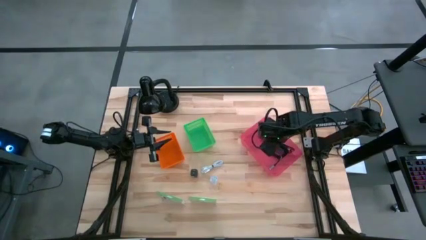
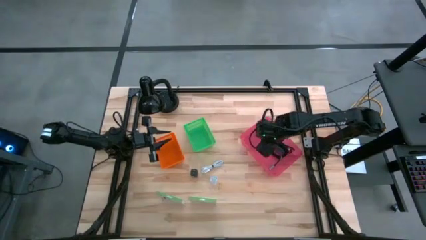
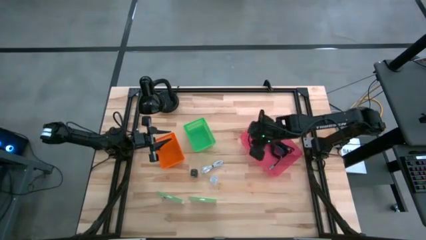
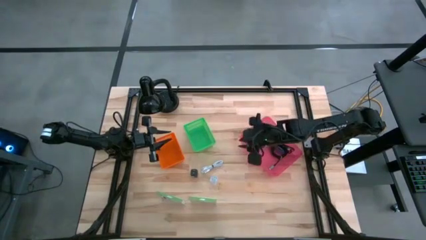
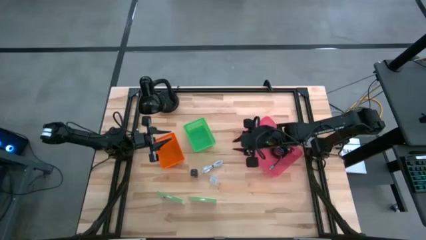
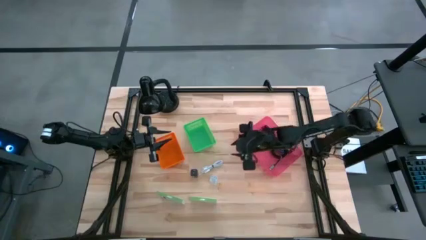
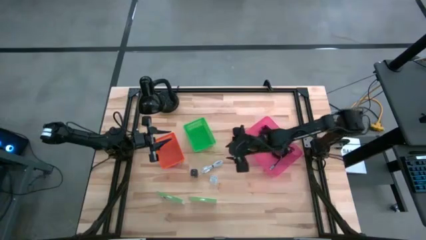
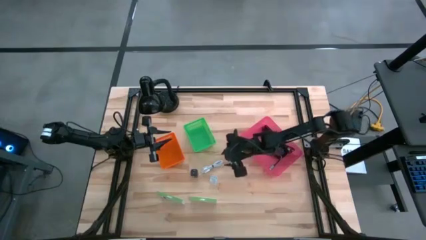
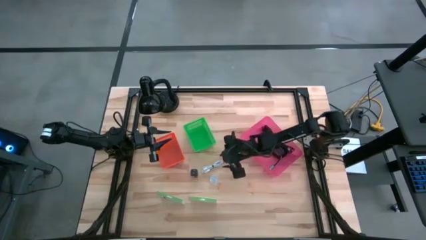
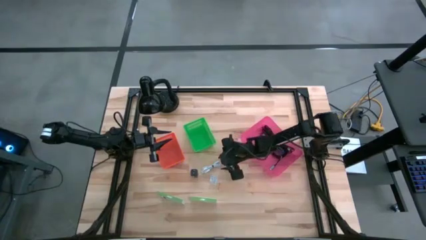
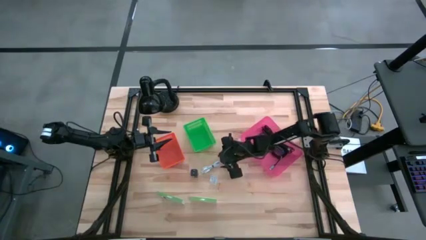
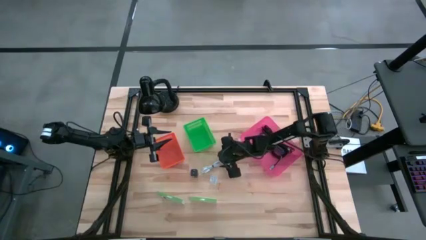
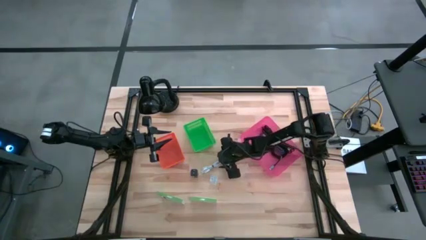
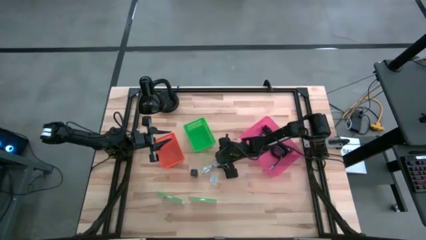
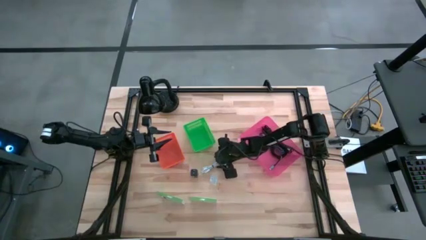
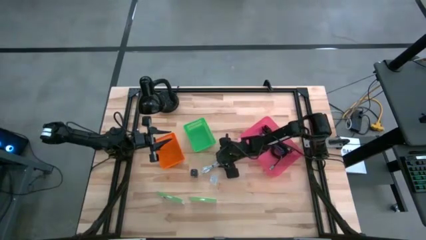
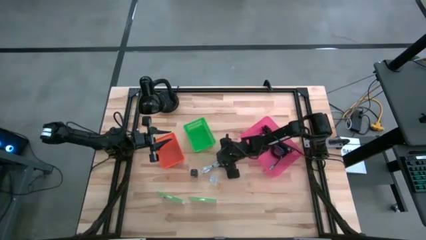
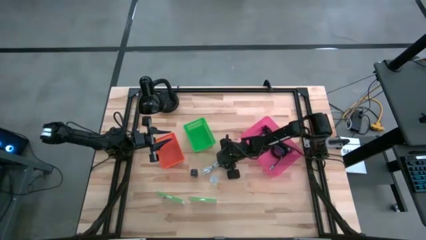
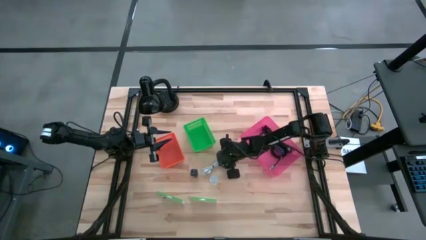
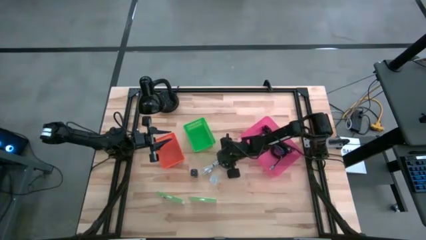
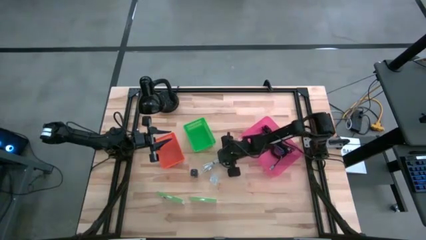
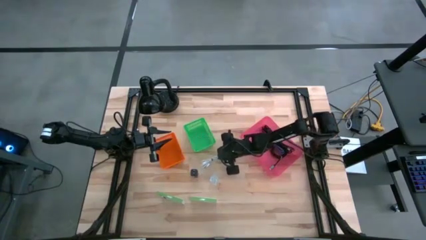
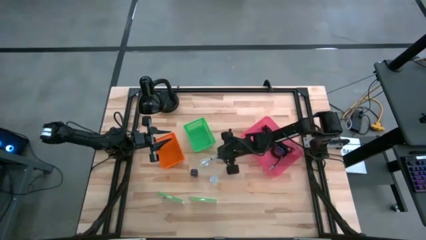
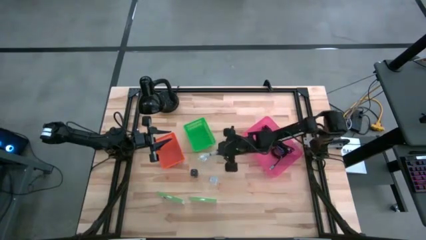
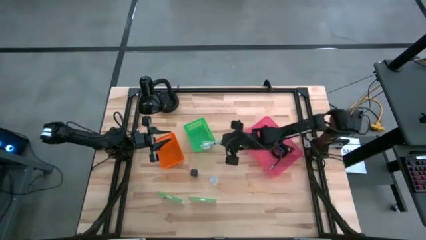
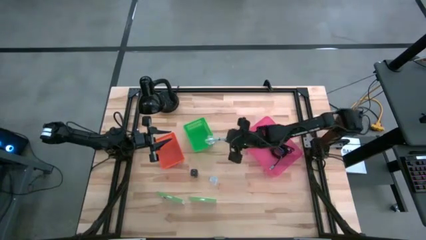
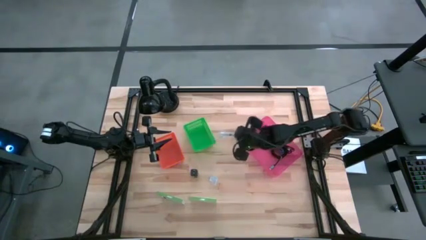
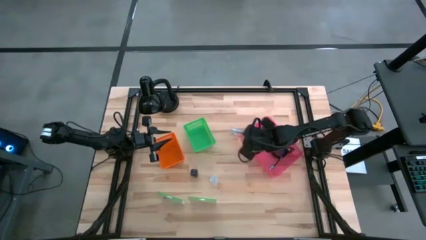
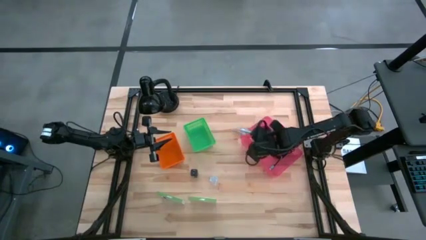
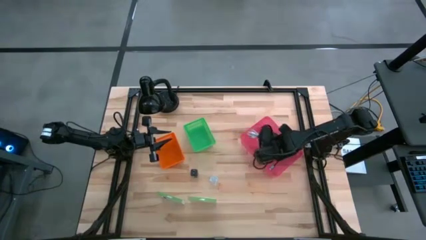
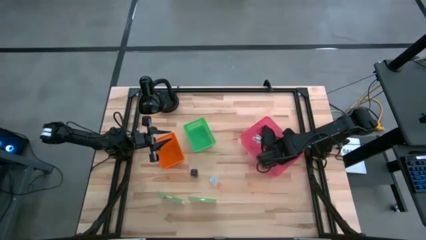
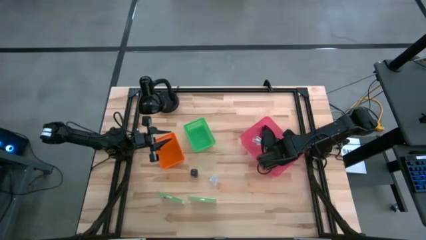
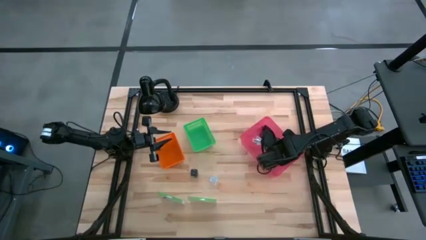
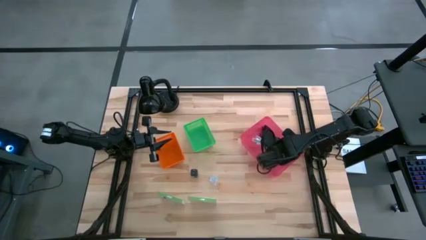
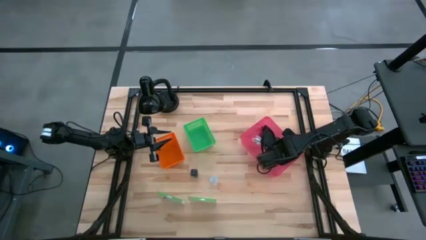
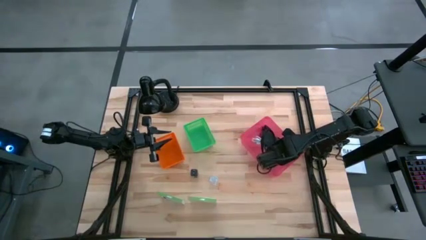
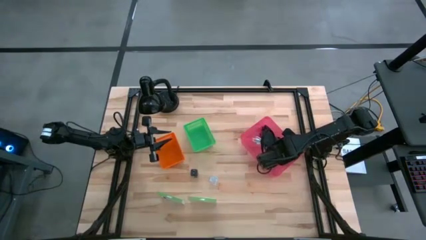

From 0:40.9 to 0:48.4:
Task: Pick and place items into bin
Put the light blue charger cable into the pink bin

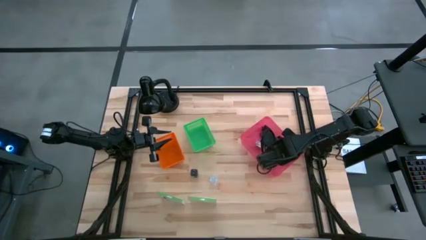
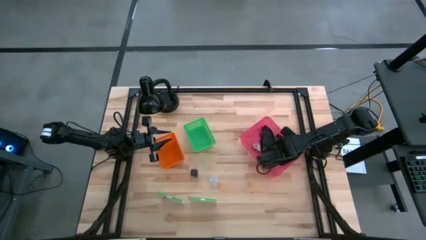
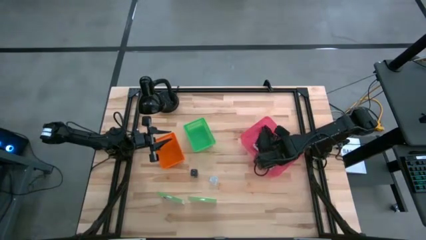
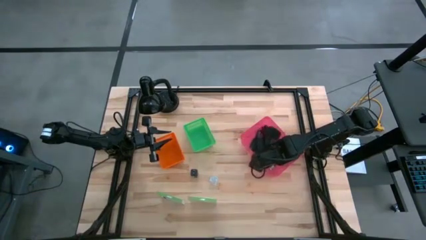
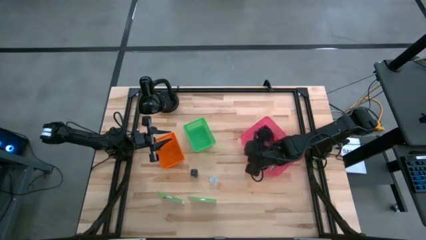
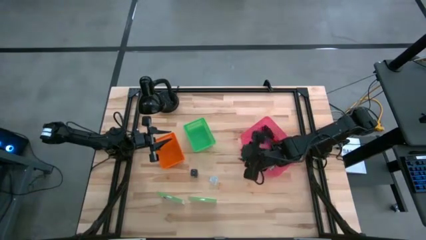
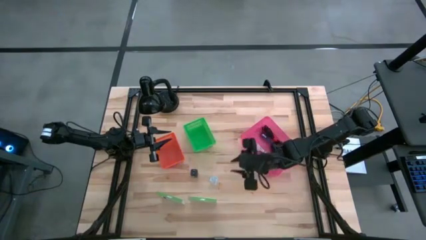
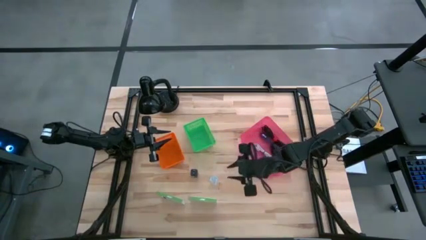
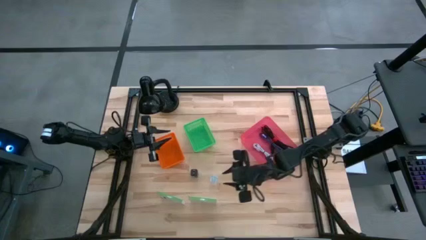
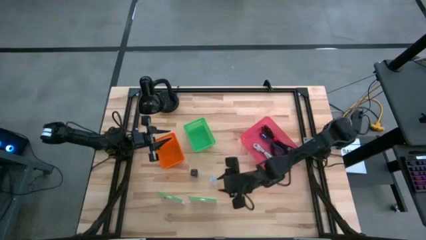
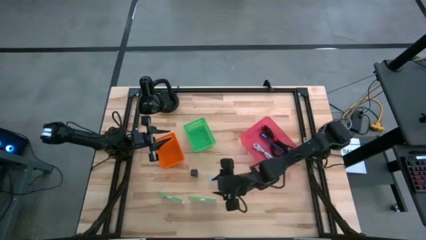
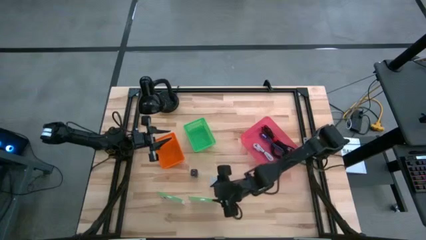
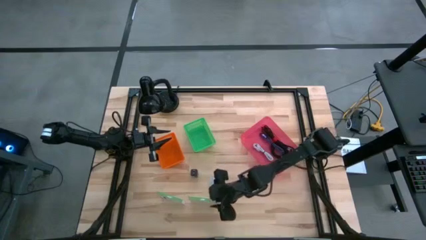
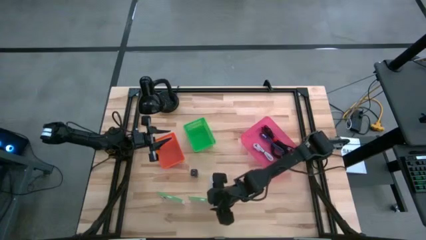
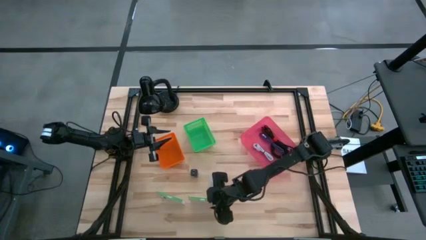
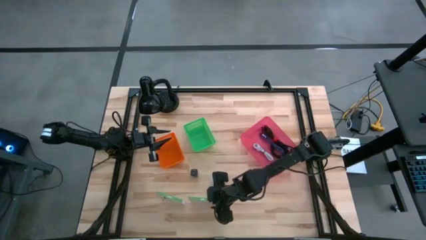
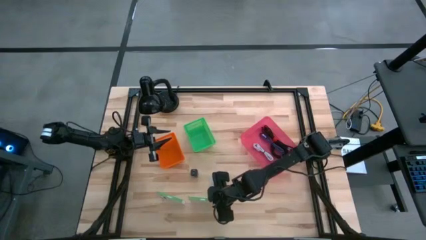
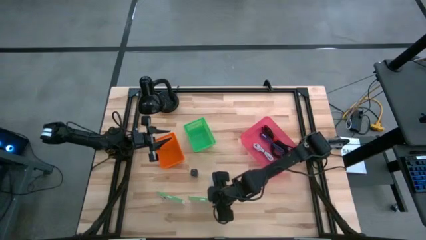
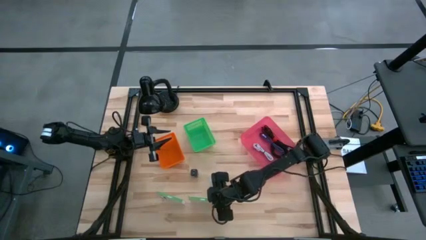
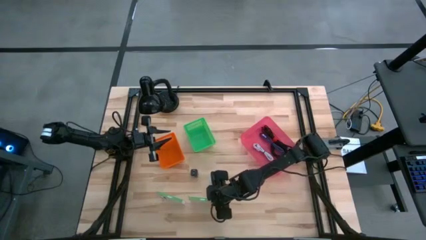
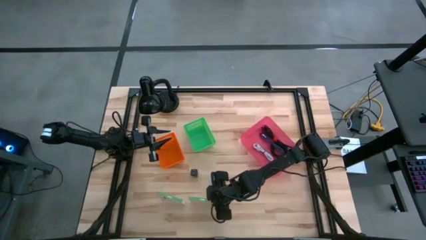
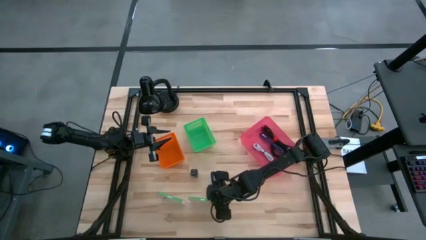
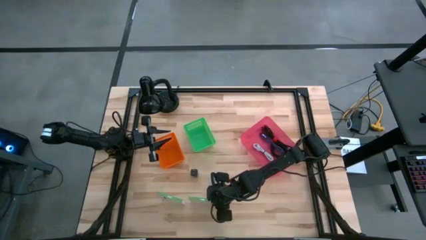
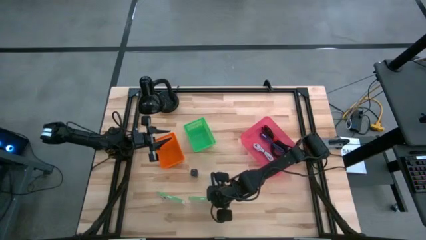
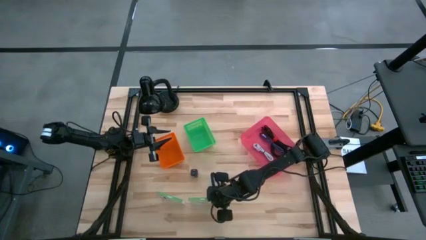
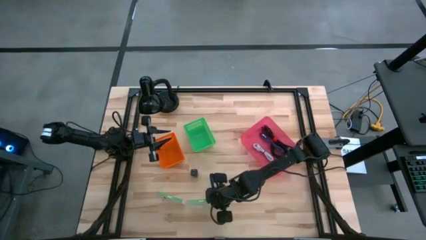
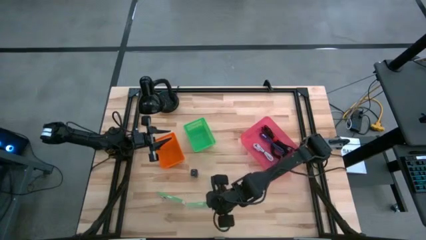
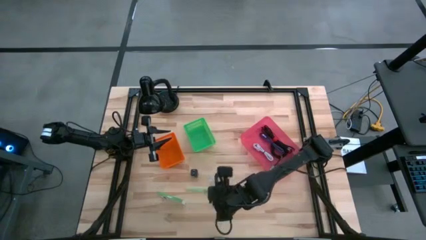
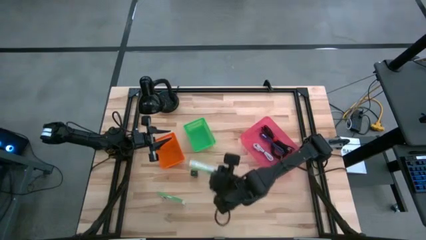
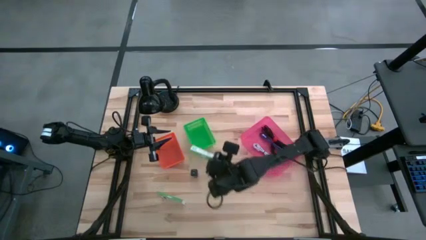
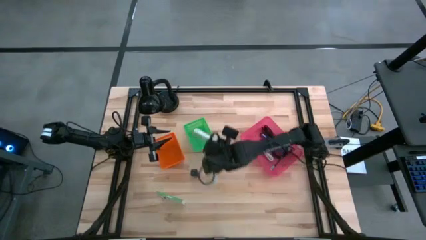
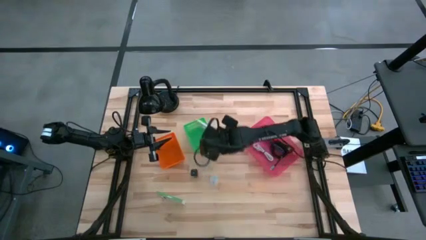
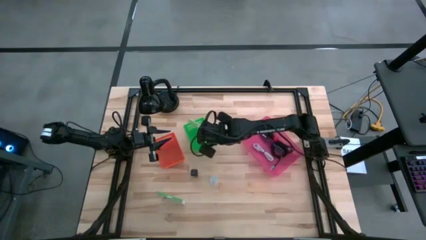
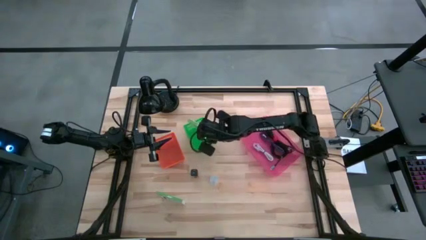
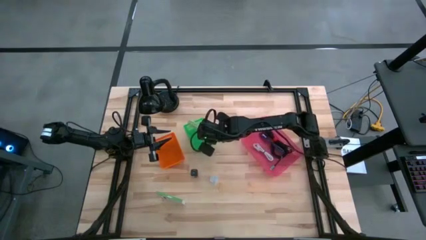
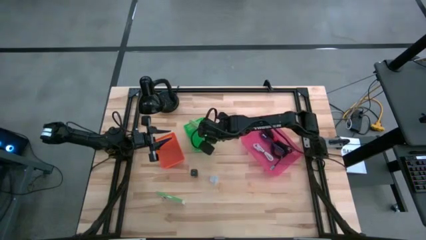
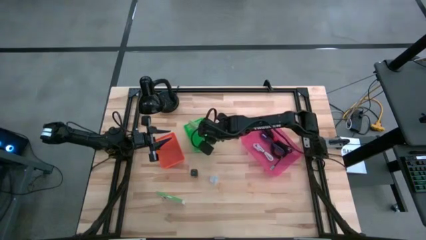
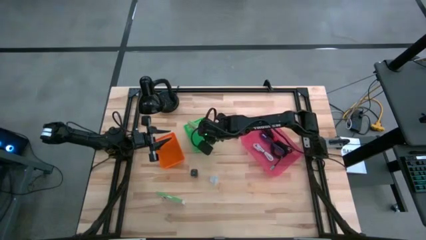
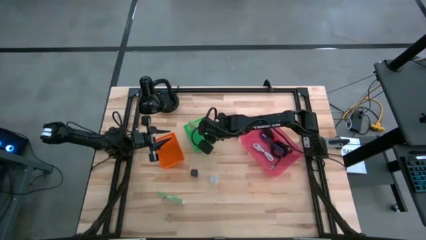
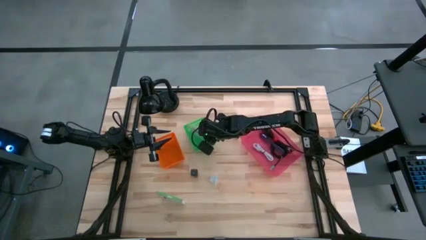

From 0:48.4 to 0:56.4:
Put the right card reader box into the green bin
